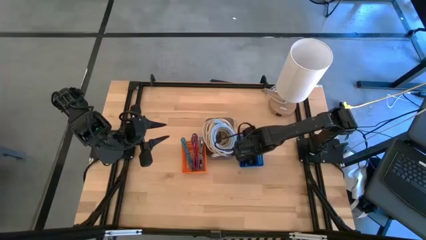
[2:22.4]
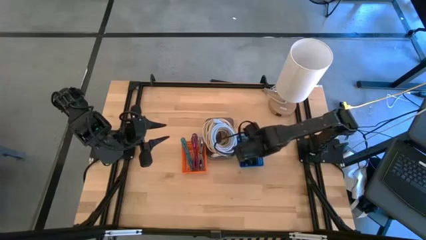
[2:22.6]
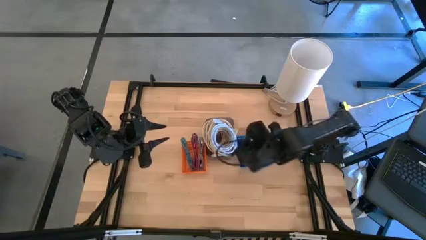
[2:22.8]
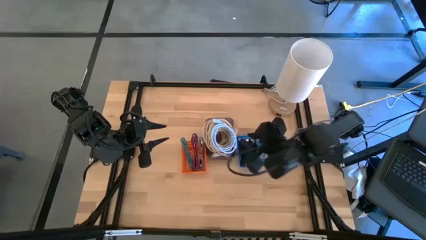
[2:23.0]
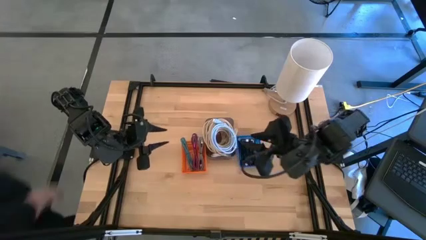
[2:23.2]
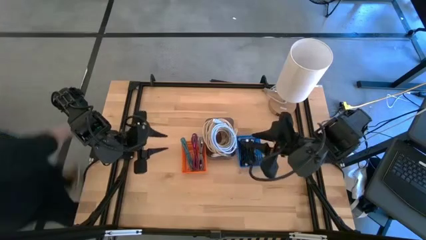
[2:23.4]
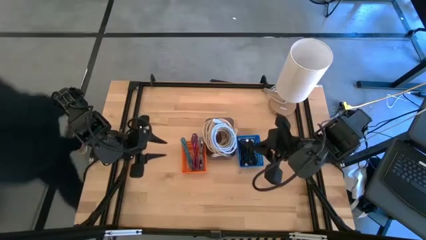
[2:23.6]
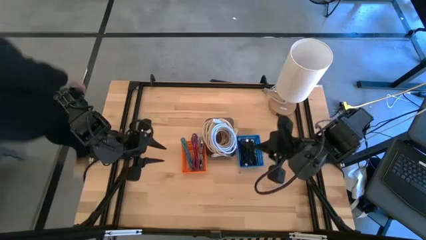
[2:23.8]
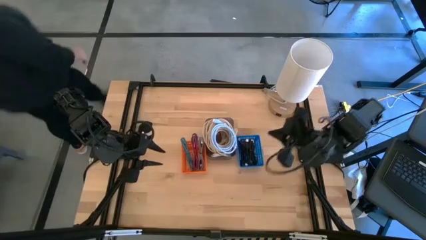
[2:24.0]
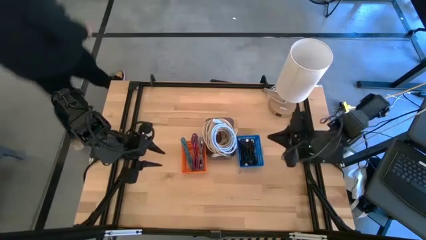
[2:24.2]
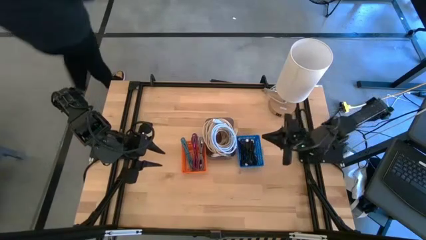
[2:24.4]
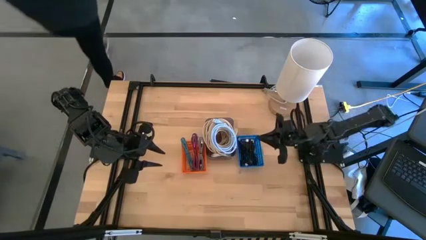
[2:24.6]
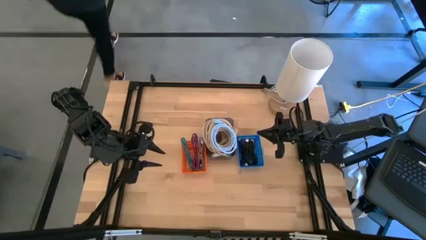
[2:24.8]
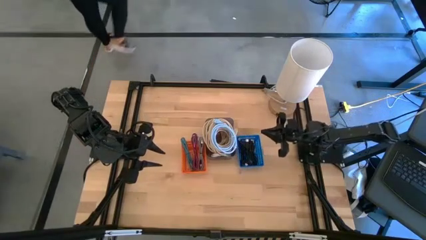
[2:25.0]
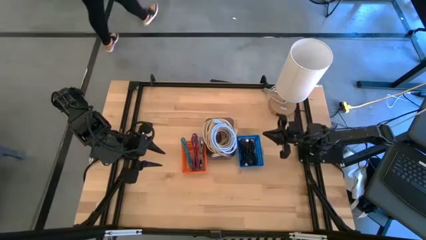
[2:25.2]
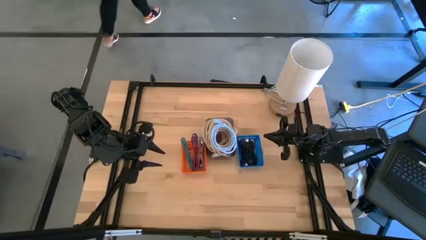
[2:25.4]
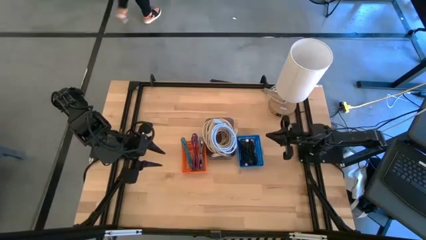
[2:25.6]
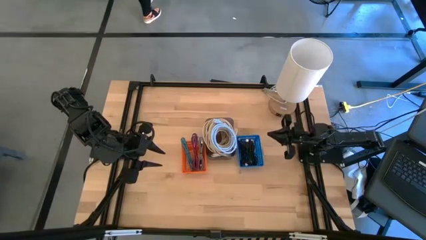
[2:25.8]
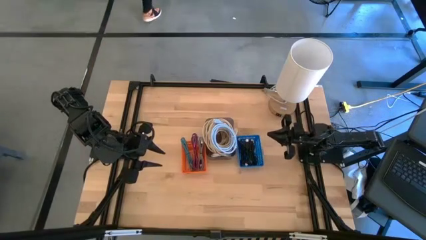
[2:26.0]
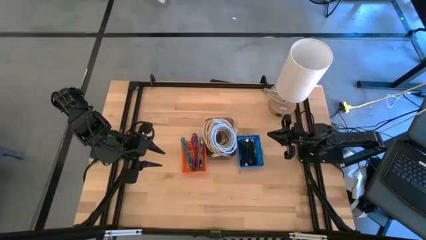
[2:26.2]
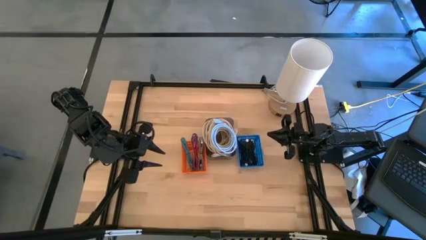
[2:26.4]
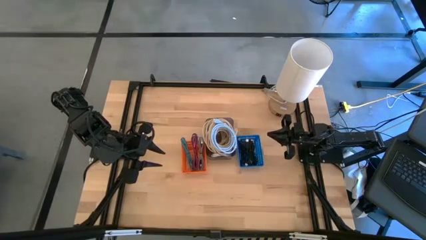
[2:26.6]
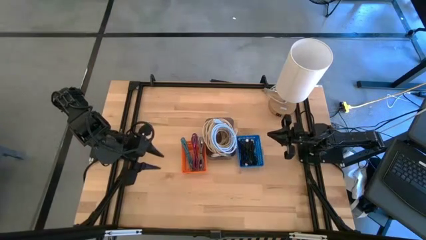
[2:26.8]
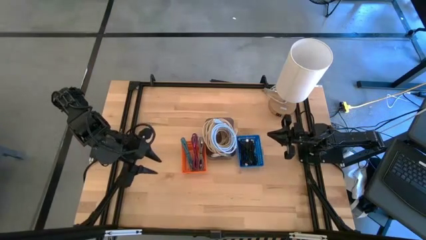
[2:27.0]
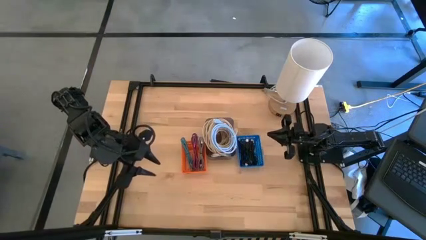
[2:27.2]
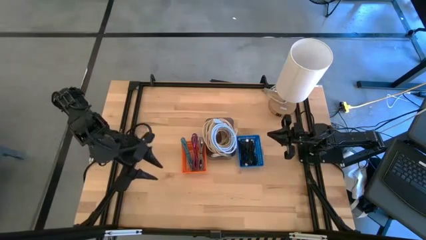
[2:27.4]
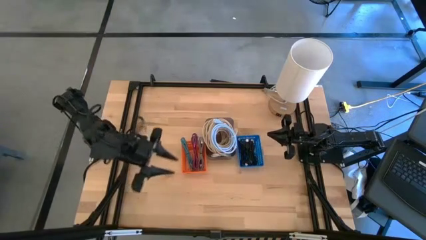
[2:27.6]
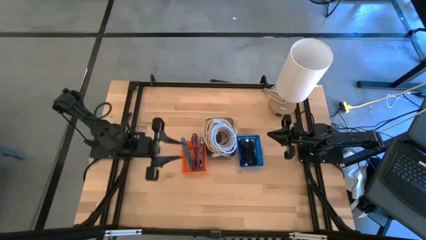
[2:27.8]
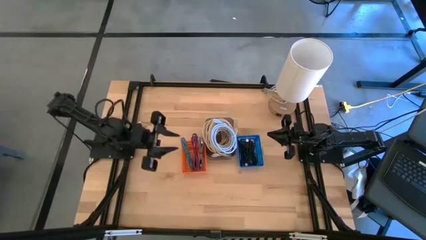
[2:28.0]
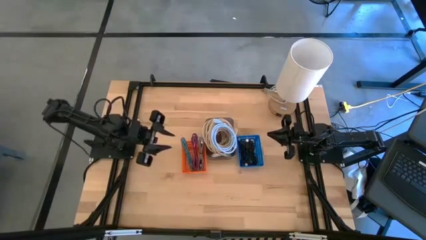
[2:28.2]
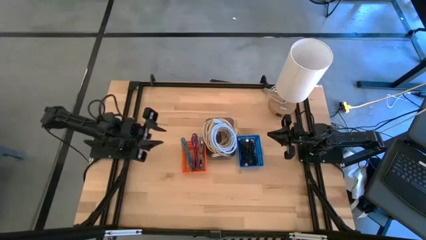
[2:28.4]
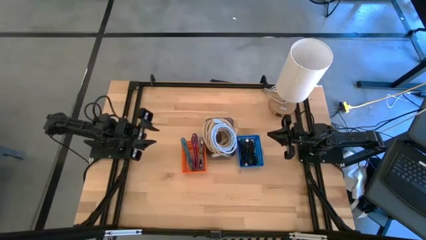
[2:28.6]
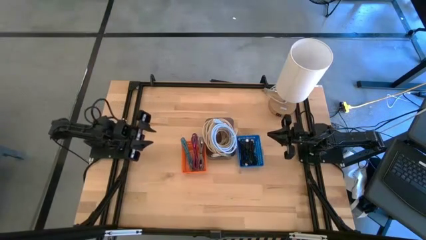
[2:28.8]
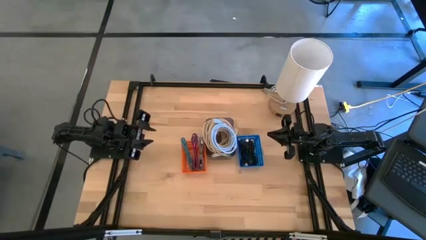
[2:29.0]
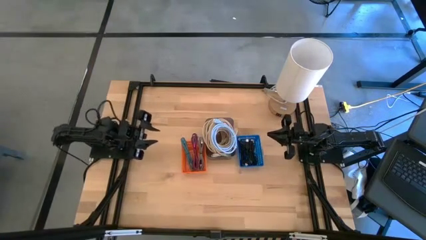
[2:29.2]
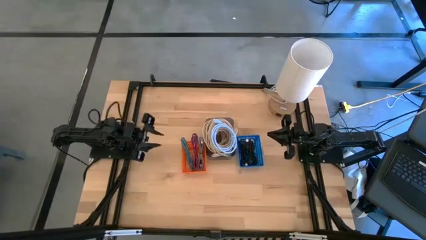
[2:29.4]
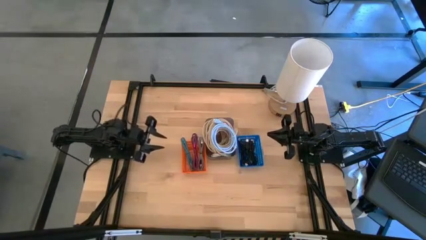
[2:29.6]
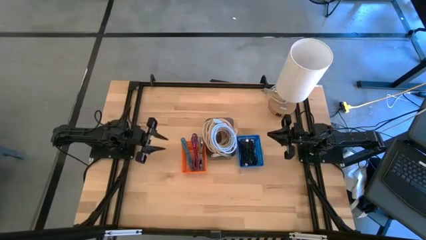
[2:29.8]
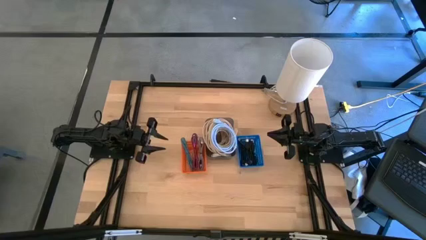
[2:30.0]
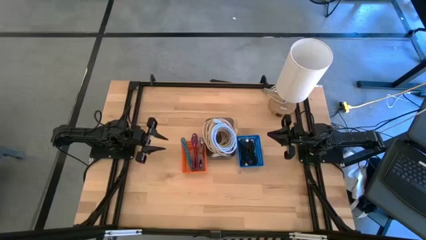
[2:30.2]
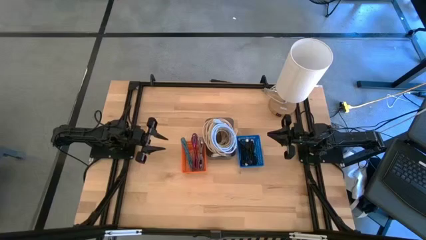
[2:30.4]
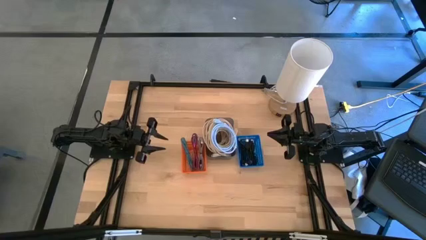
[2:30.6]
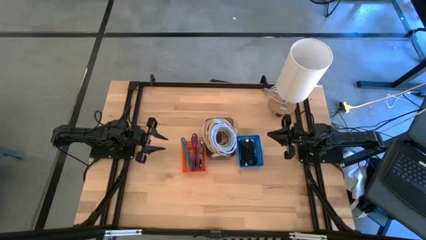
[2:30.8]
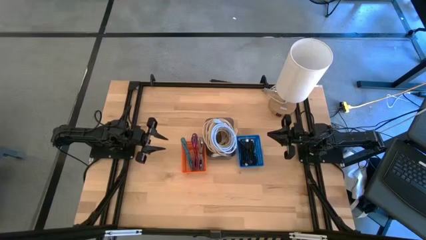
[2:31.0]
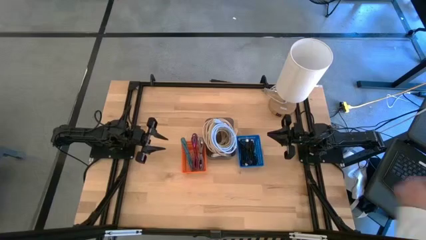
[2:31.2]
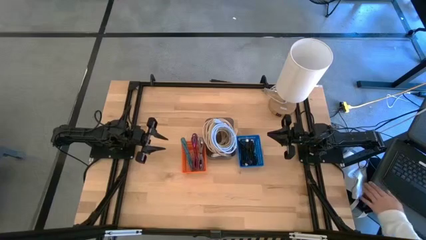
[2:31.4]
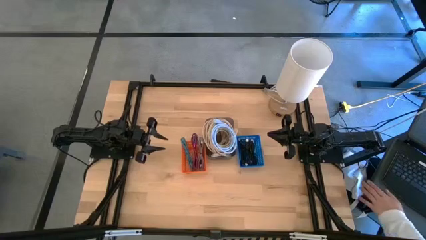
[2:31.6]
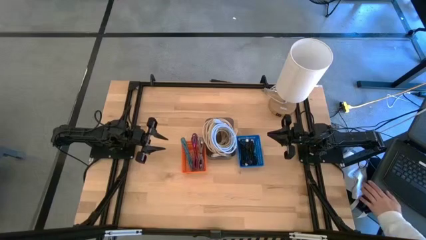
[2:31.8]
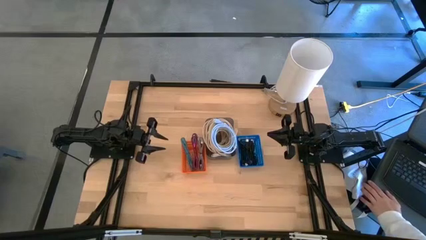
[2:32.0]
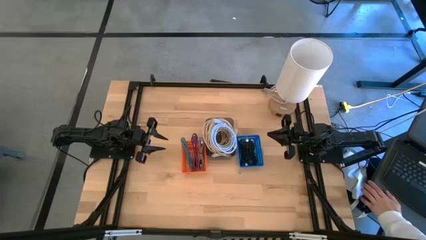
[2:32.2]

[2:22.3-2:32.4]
Task: Pick & Place USB Port
Return to Home Position

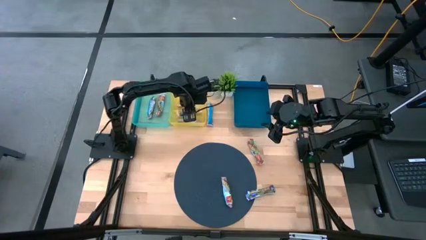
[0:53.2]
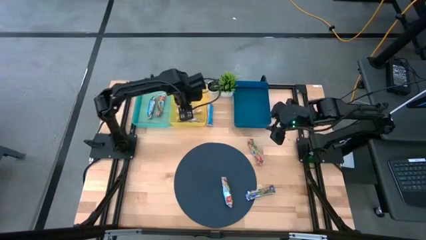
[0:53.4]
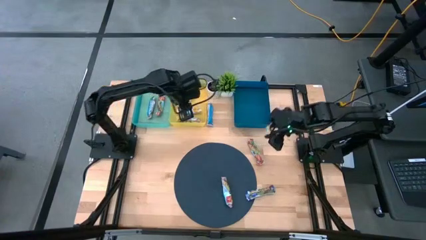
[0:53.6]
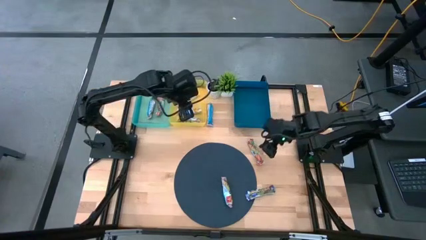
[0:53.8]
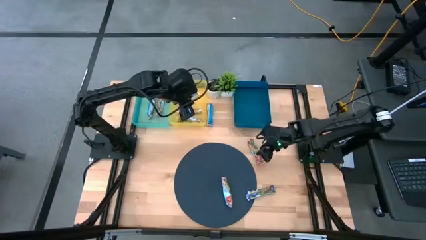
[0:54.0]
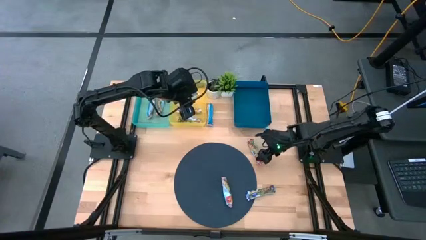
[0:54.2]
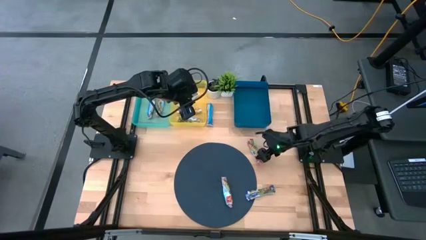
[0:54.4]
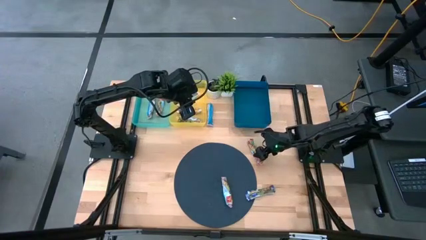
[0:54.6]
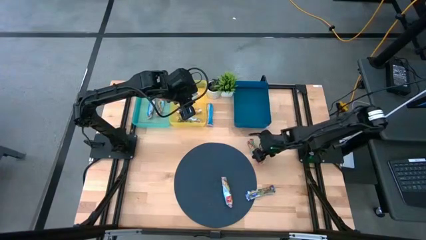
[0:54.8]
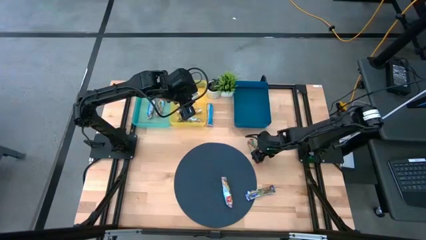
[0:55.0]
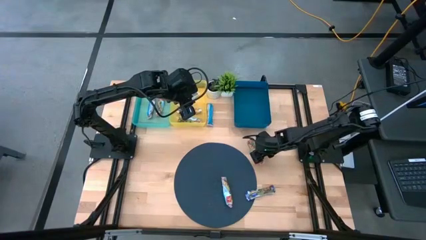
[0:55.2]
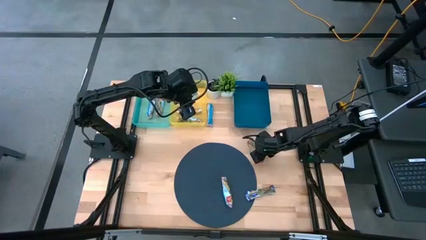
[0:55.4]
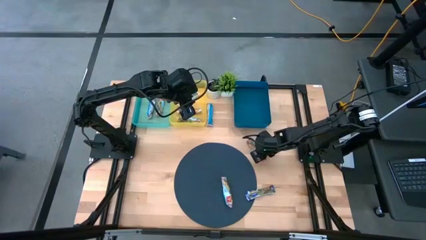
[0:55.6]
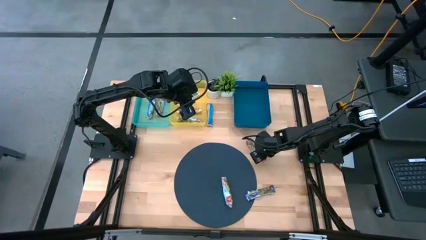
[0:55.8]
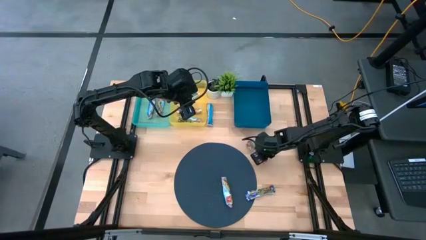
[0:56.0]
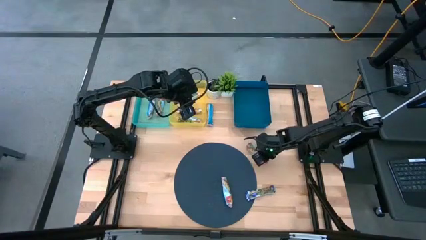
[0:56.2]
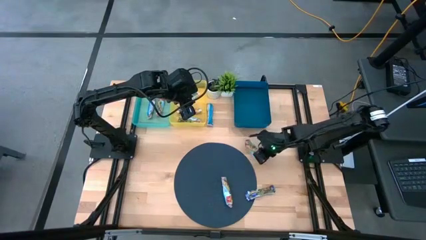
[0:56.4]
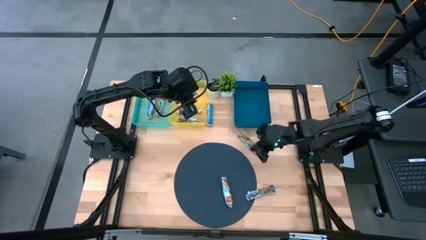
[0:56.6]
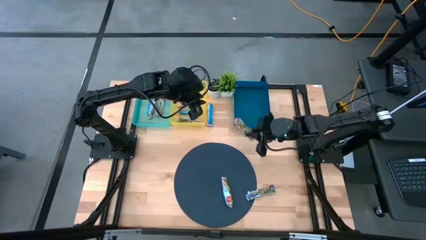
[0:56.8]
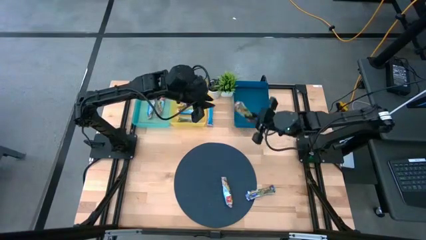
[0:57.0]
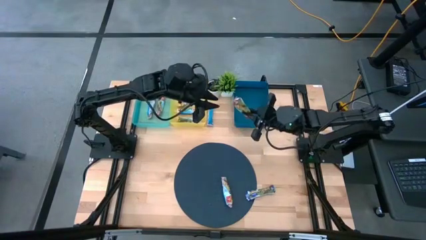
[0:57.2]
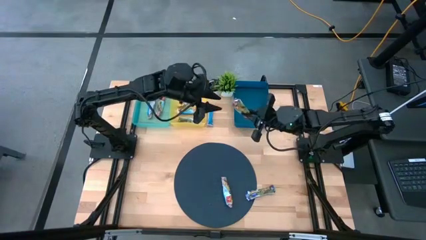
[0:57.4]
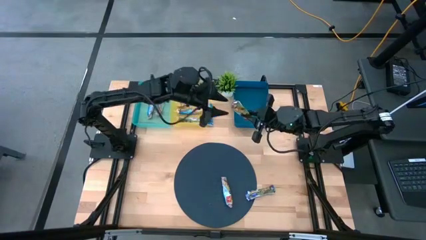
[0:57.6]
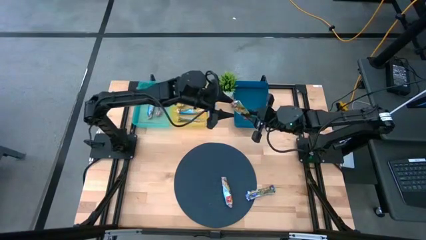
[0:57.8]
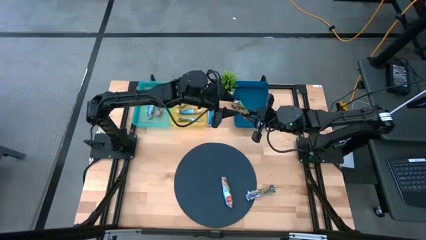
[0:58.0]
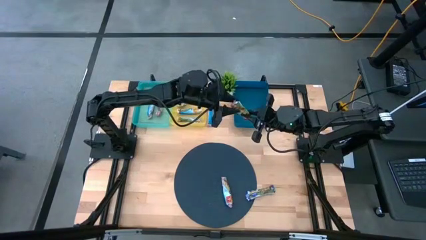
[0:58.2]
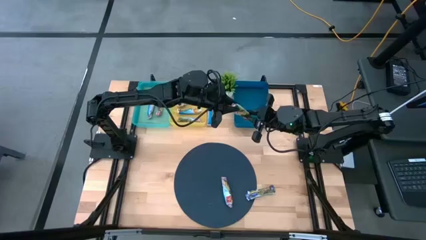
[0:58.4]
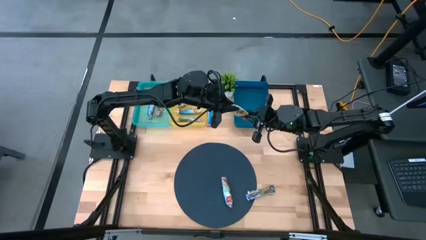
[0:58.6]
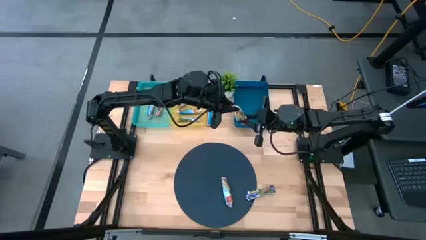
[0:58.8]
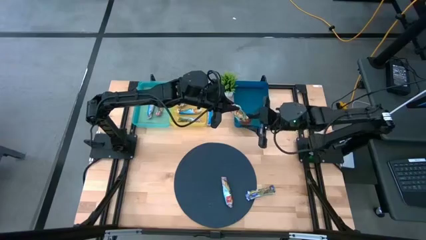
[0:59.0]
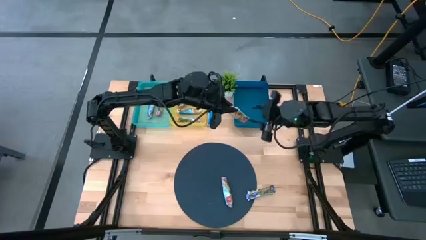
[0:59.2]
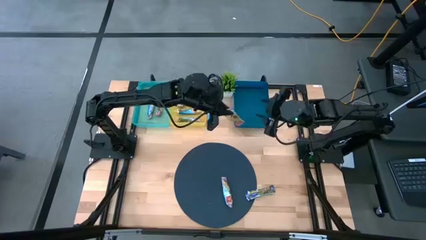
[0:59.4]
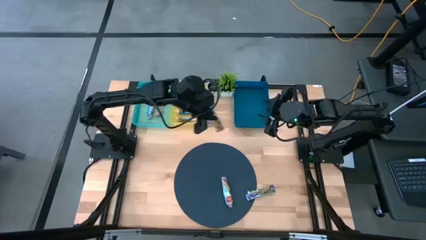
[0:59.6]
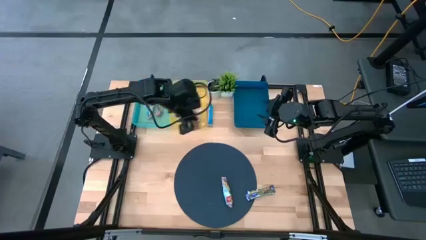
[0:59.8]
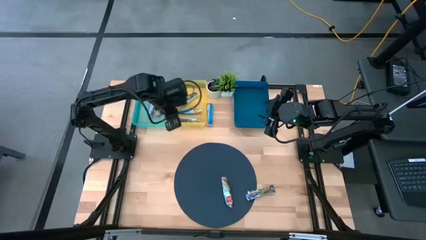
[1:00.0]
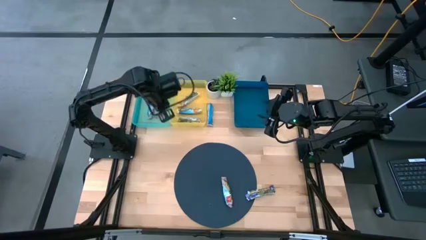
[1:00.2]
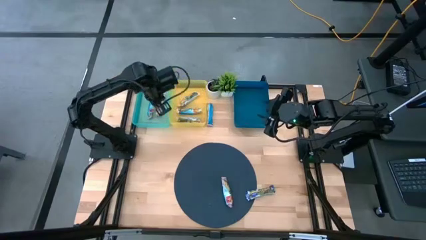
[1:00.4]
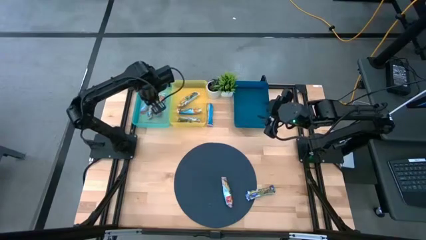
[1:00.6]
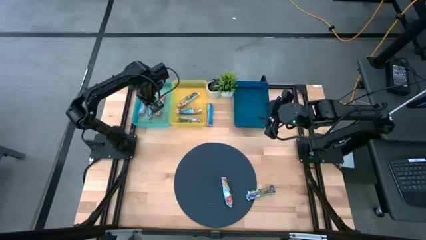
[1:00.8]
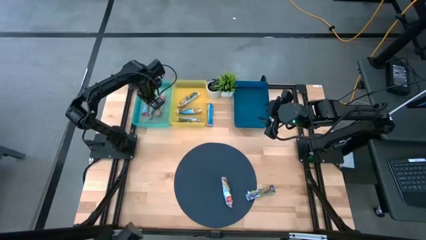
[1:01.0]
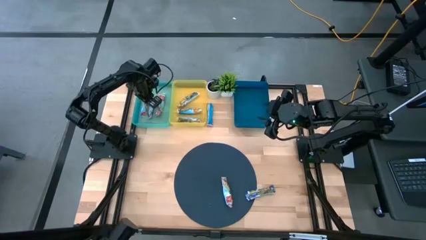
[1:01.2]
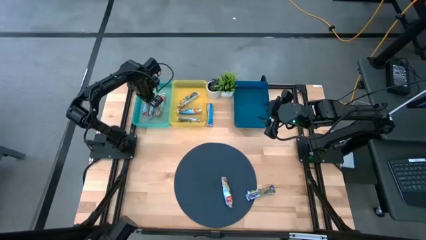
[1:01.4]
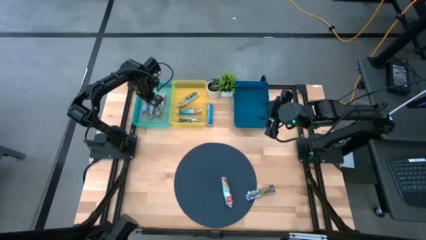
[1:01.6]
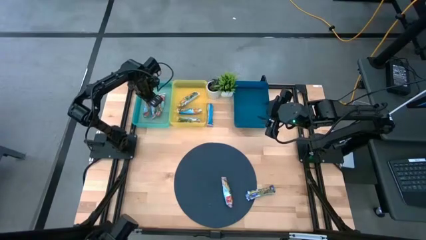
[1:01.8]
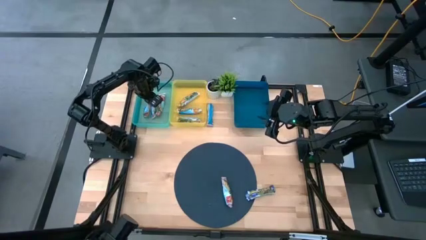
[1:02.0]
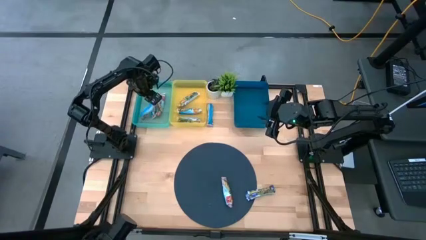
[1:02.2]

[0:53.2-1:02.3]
Task: Pick and place Granola Bars by type
Put the red granola bar into the green bin
